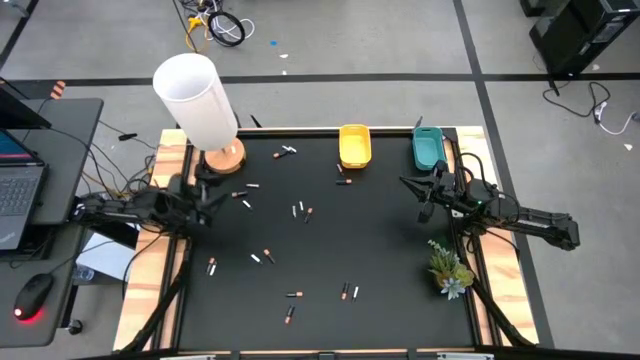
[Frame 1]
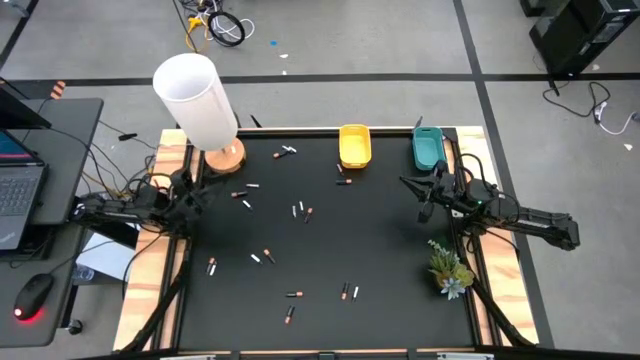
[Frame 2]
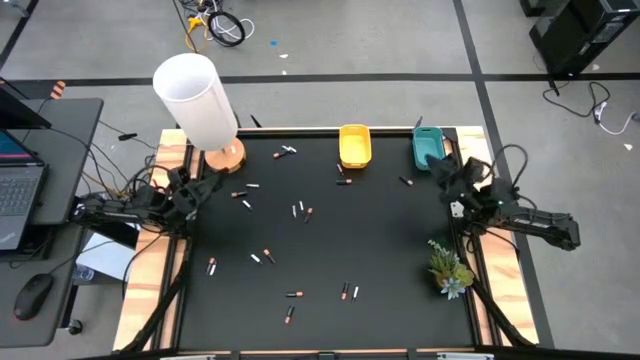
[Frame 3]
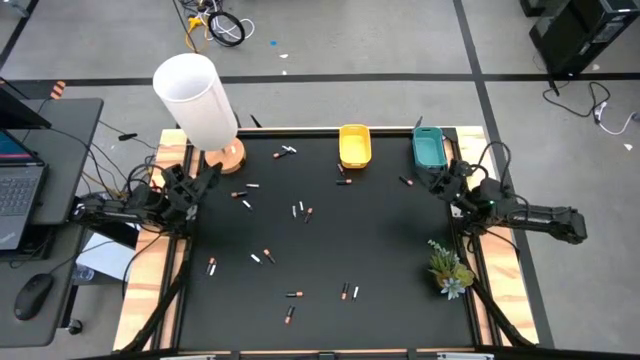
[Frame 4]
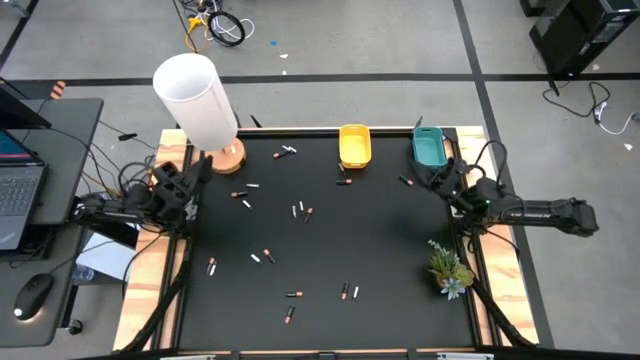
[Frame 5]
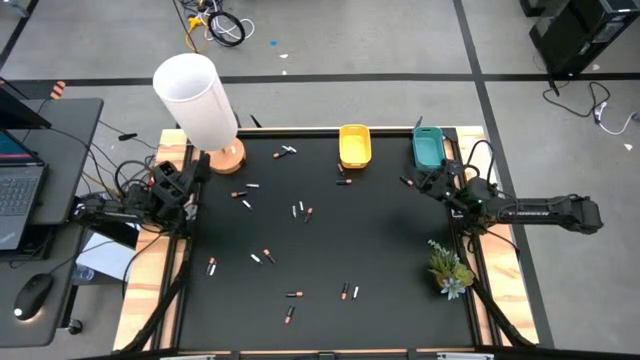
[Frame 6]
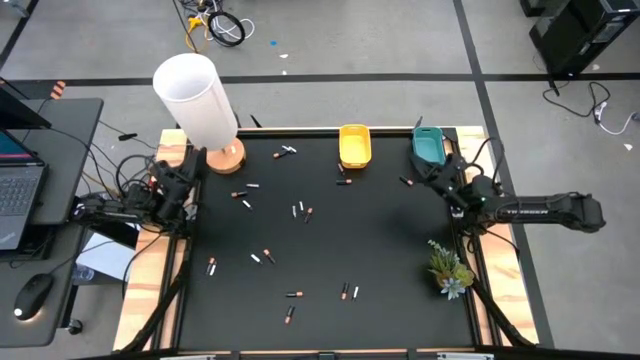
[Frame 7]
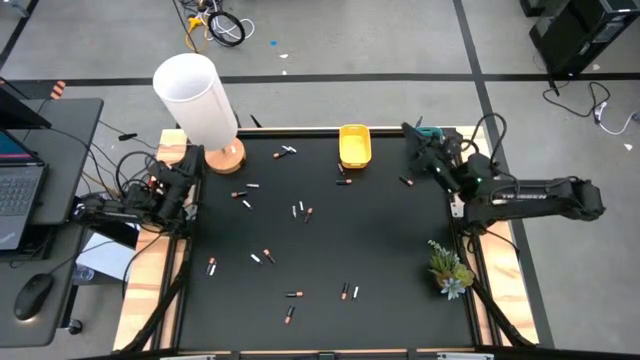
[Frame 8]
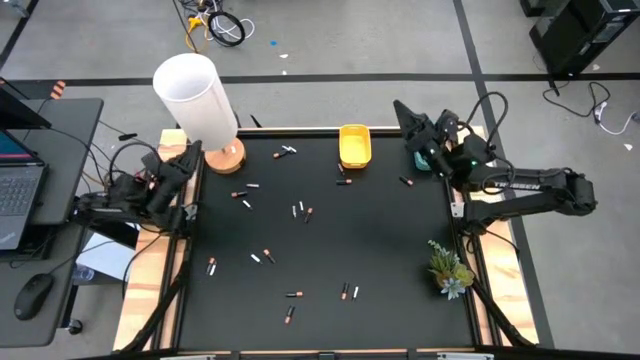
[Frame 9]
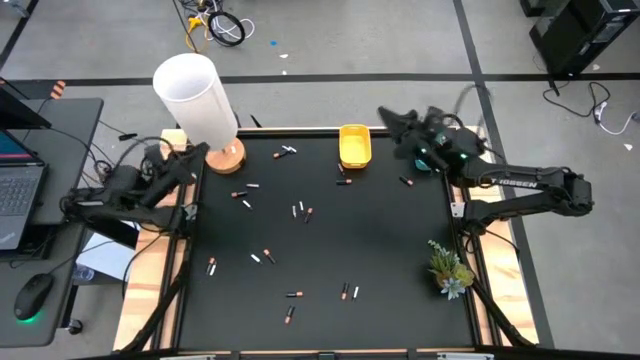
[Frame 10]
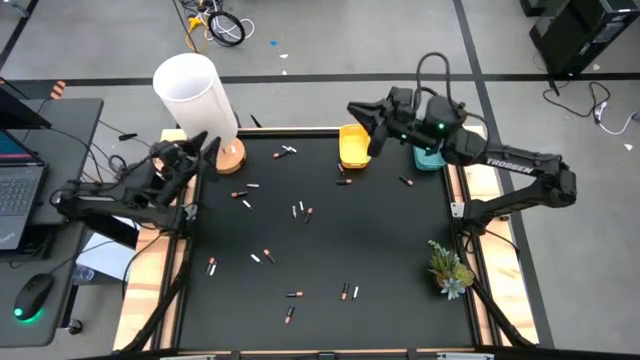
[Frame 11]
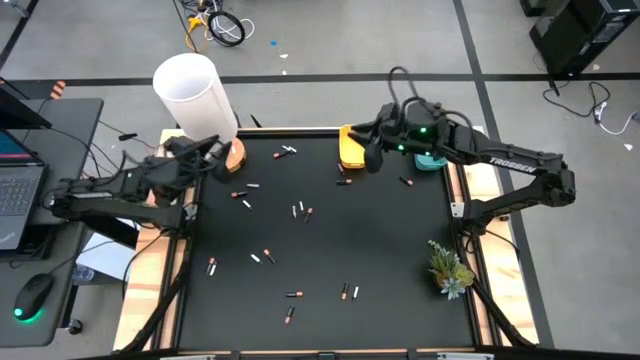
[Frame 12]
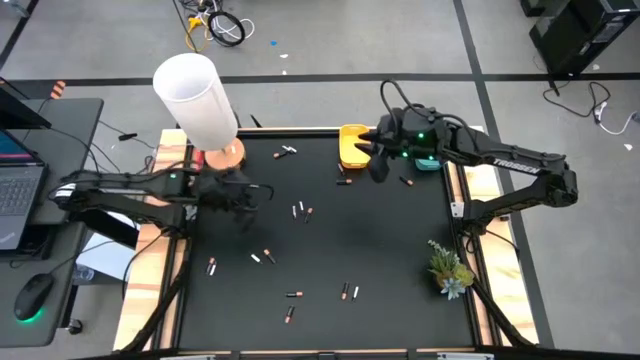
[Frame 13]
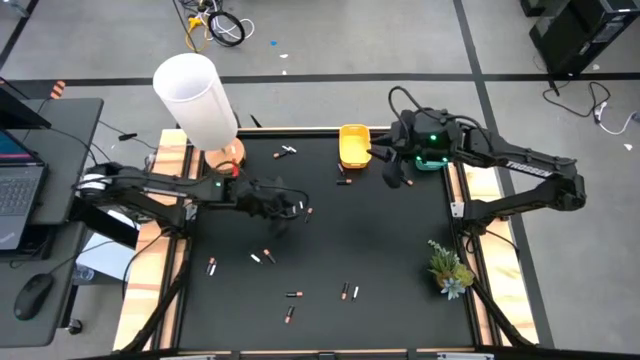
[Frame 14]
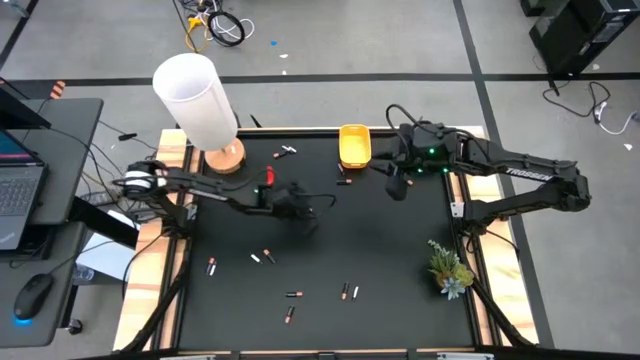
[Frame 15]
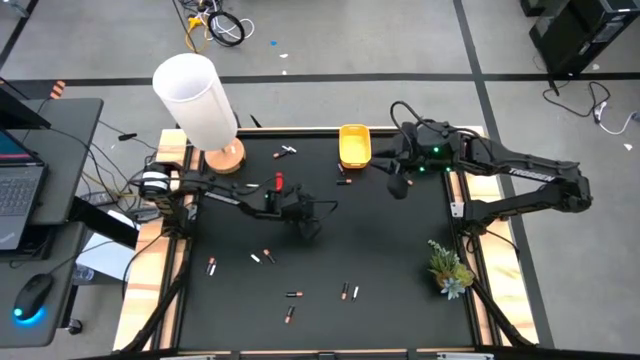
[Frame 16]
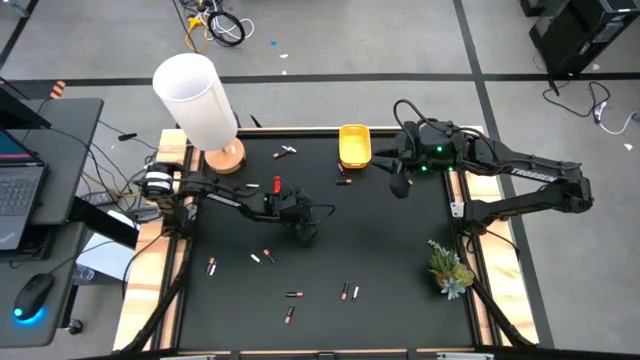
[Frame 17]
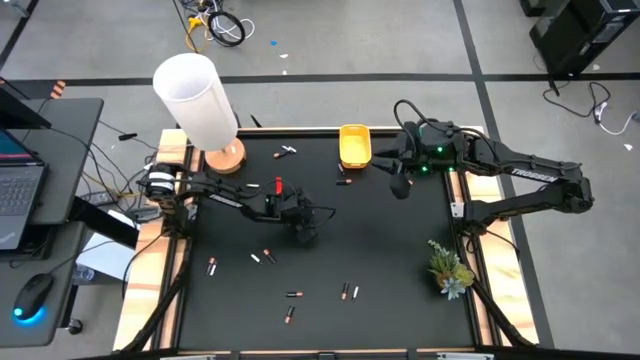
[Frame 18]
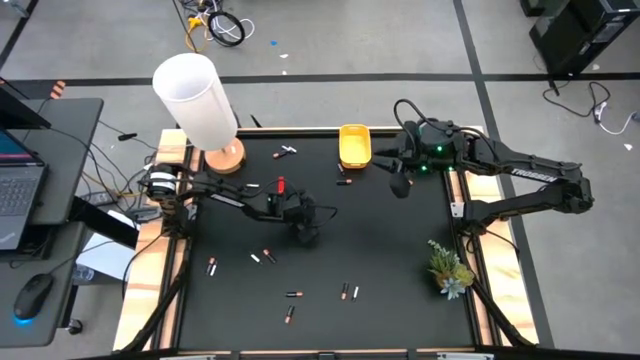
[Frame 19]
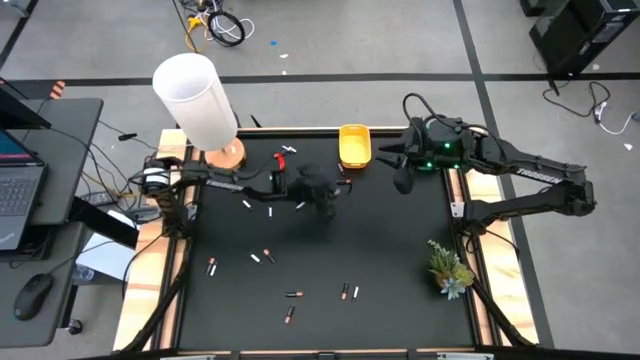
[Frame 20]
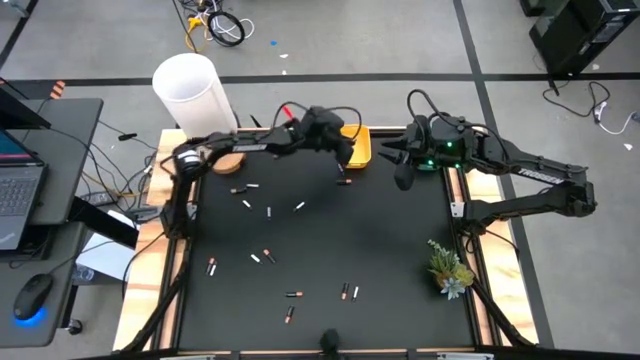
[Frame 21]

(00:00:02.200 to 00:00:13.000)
Task: Sort batteries
Put the black battery into the yellow bin

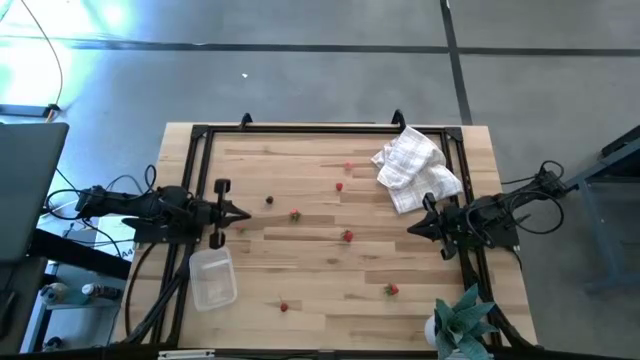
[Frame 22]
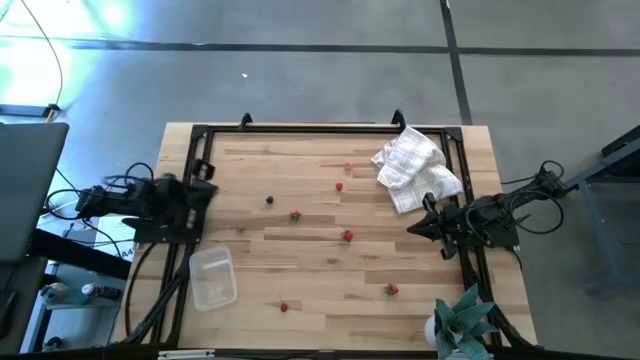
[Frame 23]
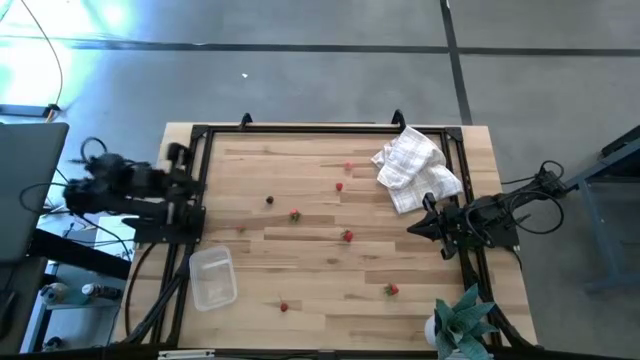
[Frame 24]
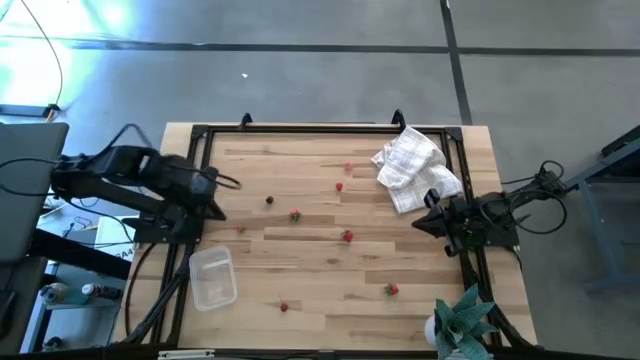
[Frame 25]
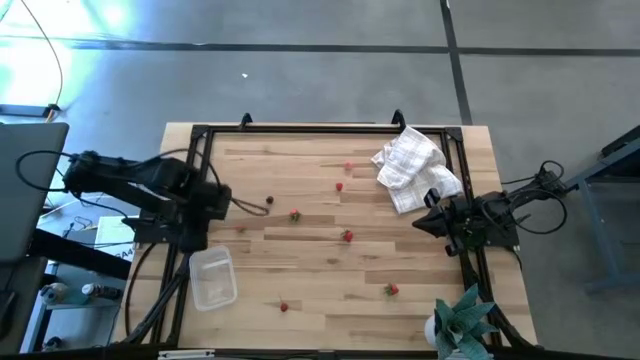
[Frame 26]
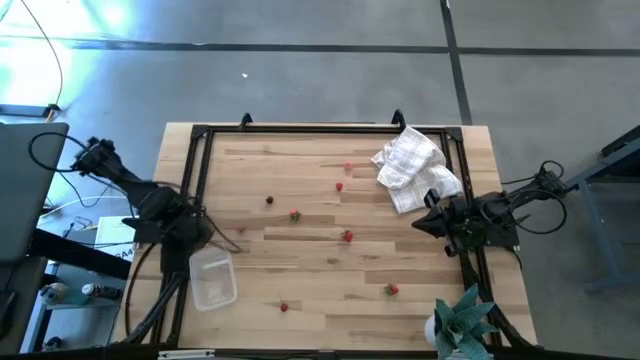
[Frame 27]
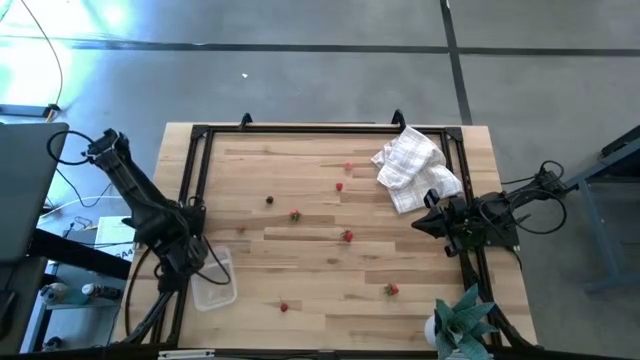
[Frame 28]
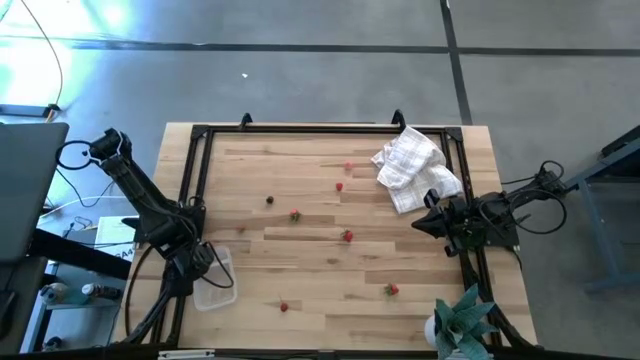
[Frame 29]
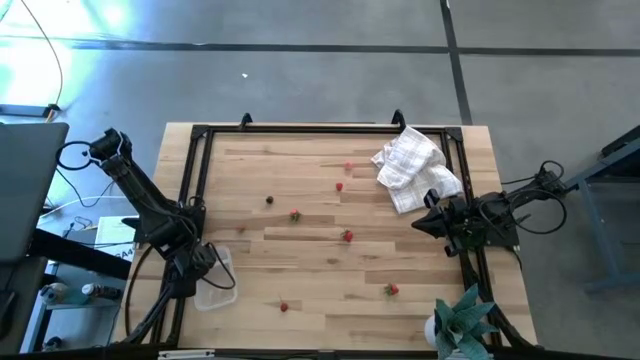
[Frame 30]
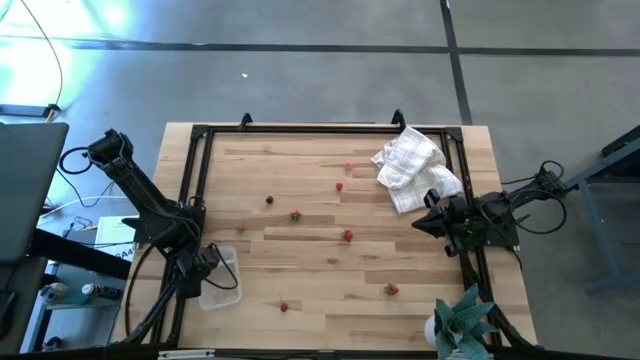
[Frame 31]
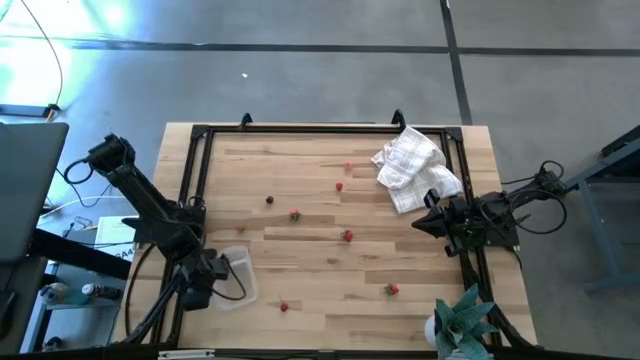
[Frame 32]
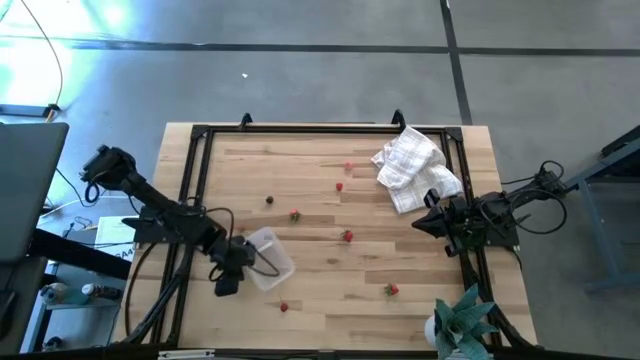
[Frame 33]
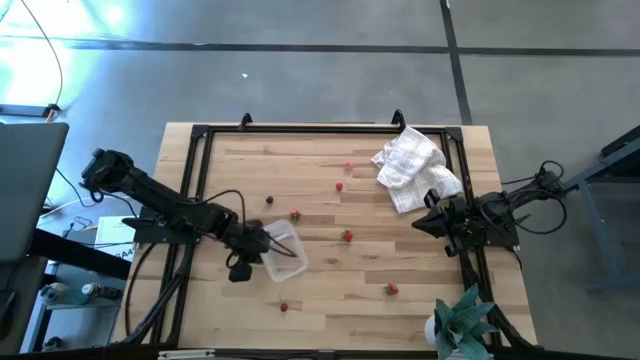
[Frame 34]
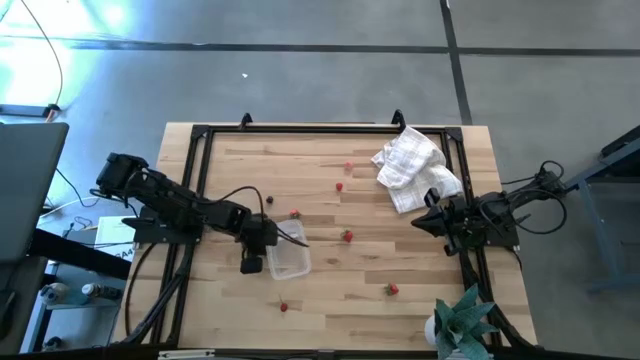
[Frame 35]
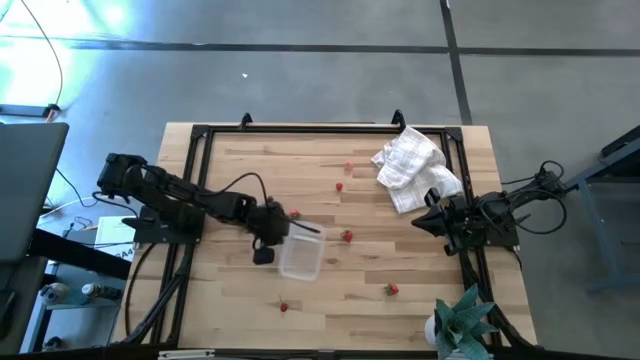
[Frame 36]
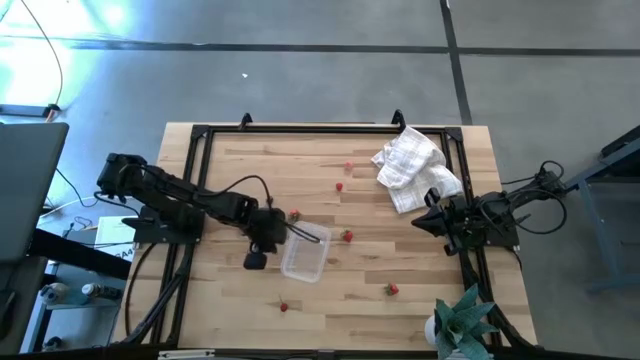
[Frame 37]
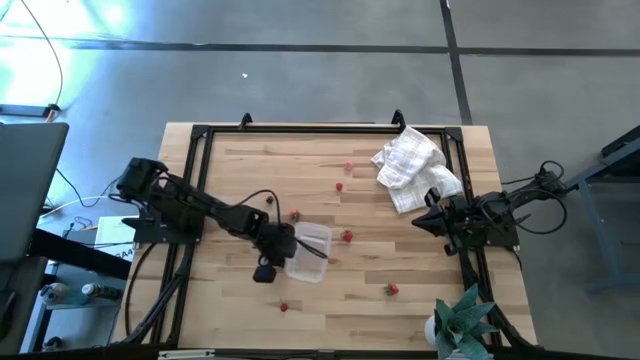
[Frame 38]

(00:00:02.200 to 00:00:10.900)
Task: Pick and placing Produce into tupperware
Move the transparent container to the center of the table
